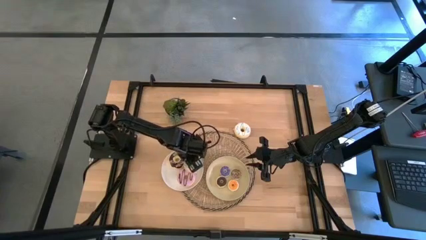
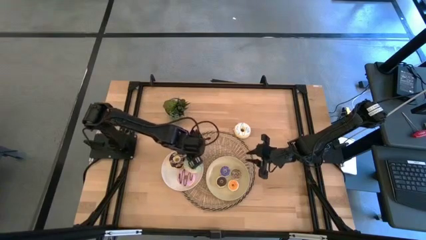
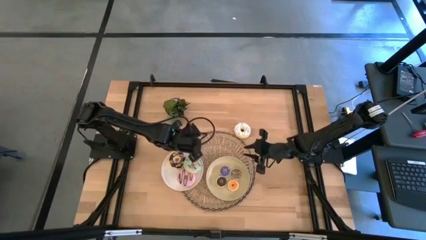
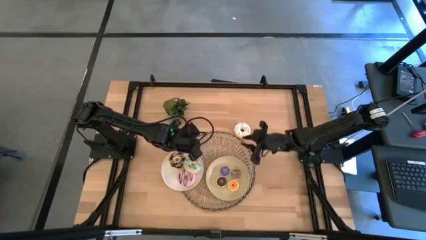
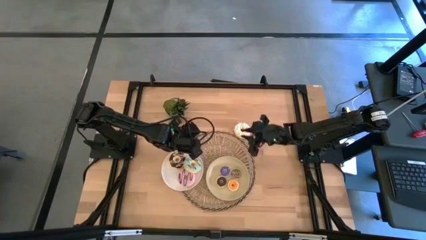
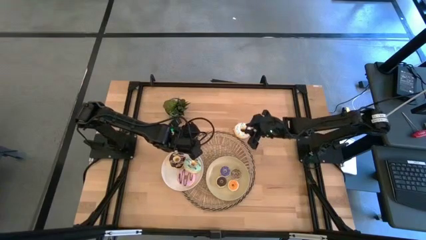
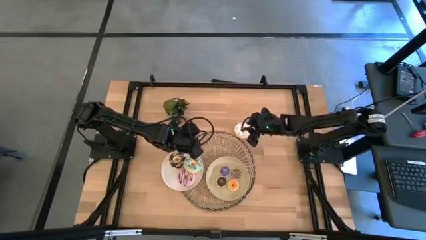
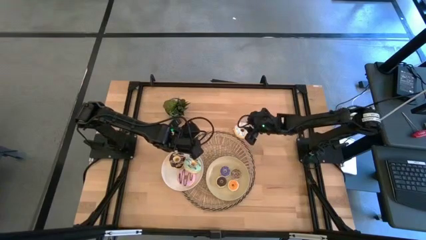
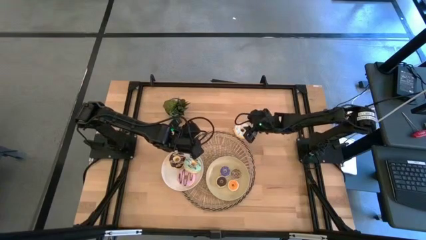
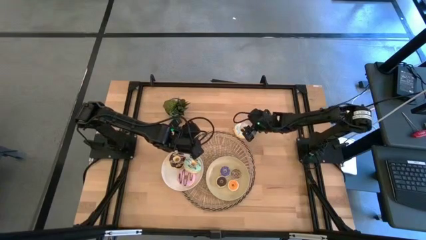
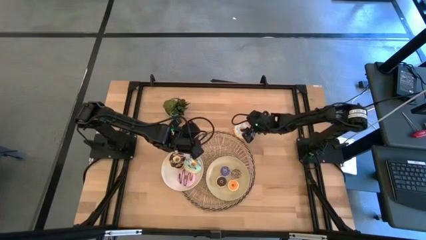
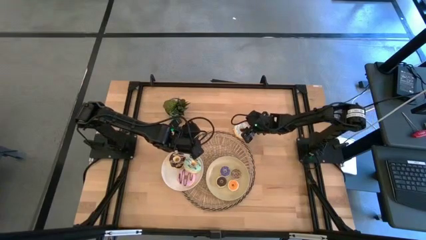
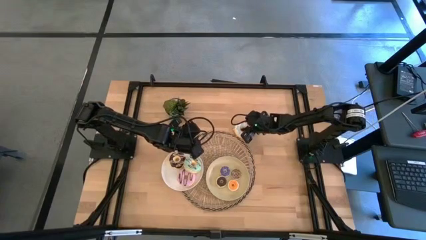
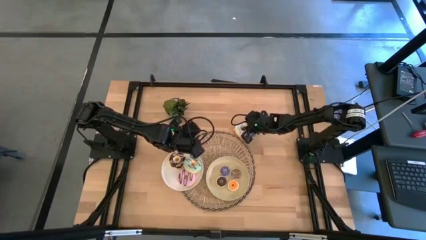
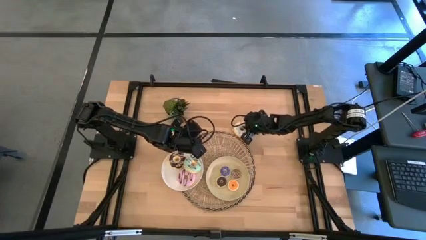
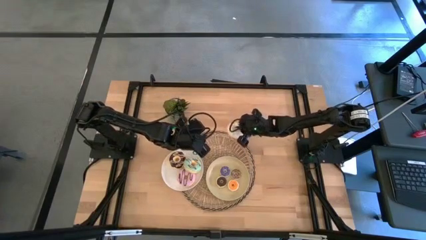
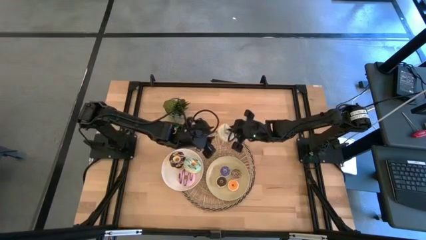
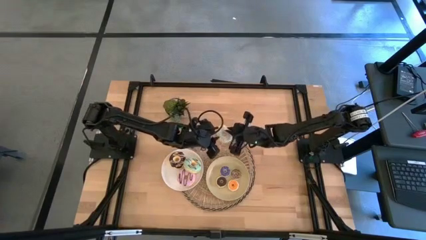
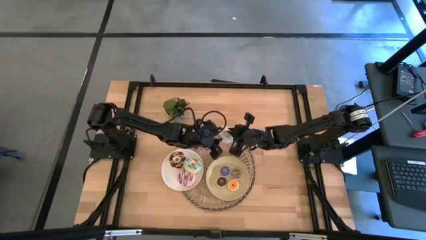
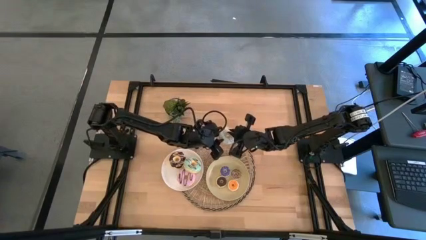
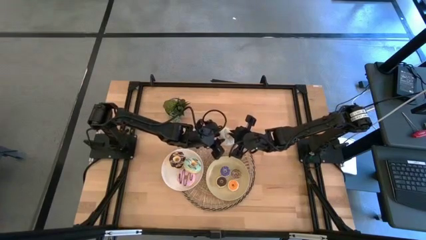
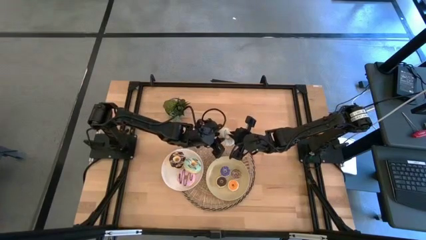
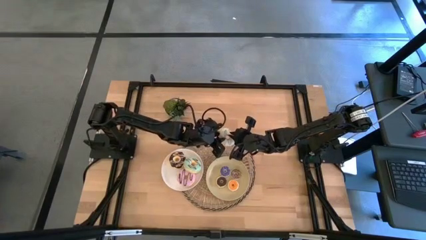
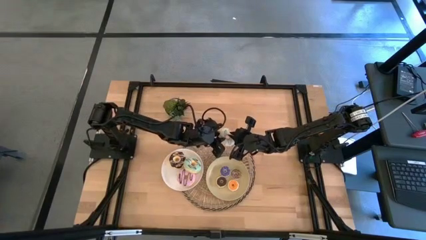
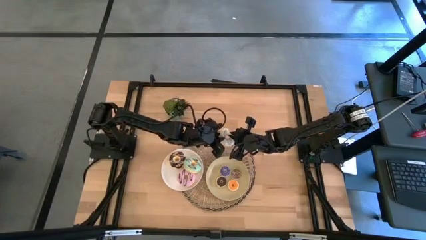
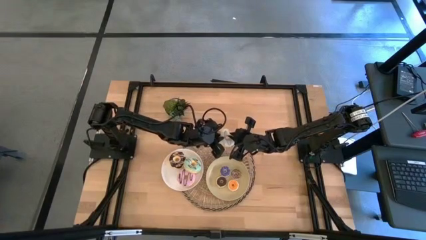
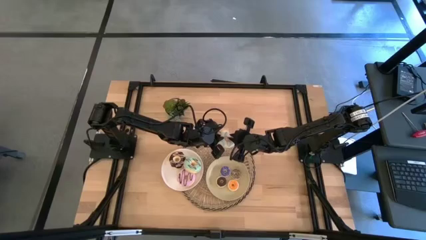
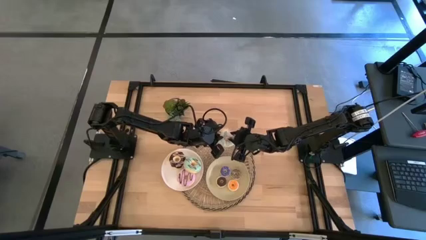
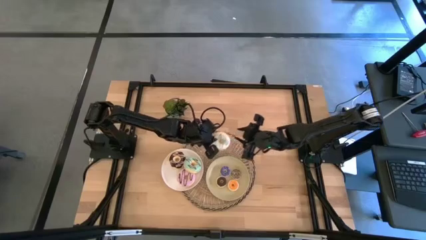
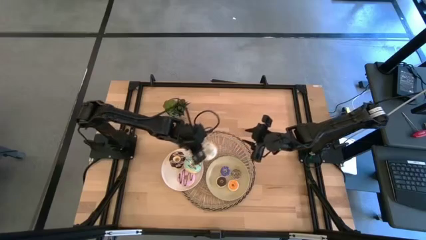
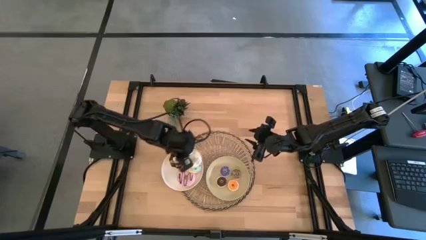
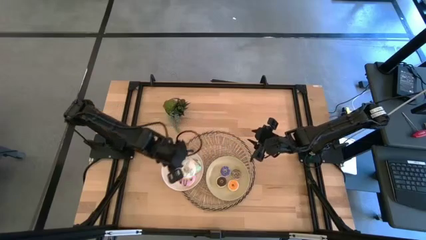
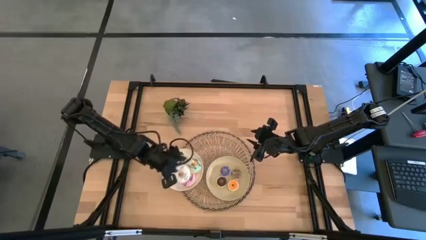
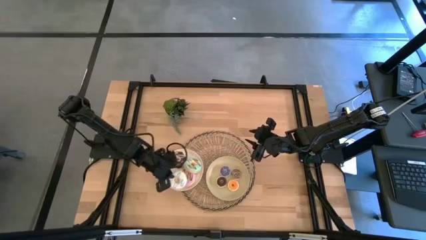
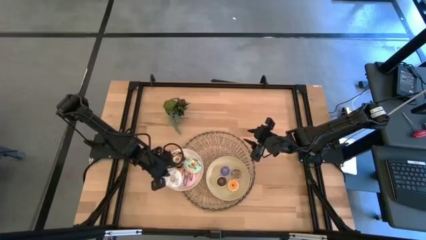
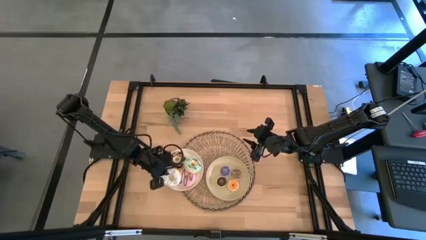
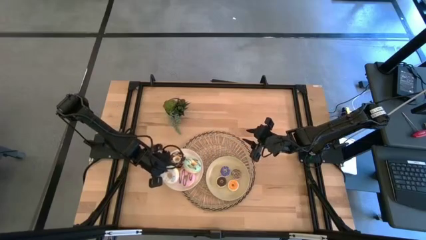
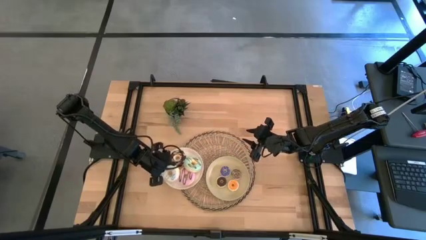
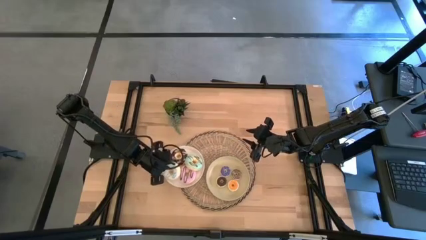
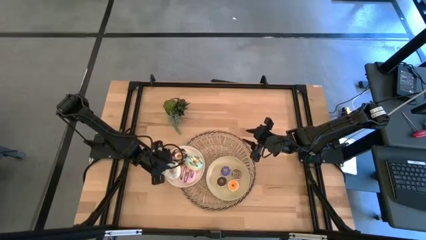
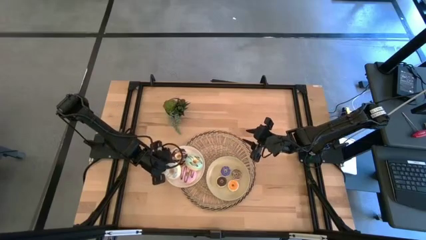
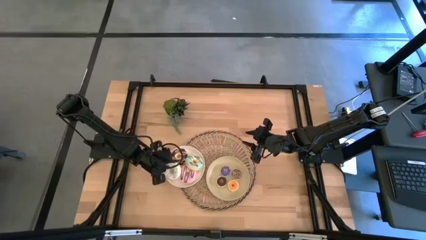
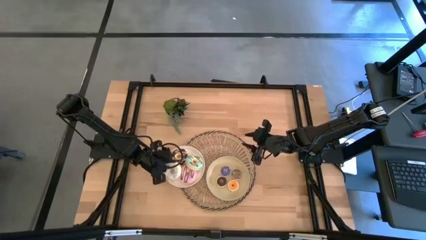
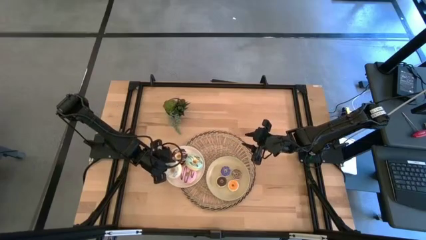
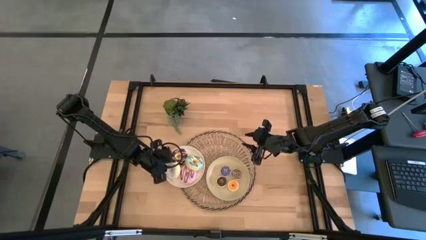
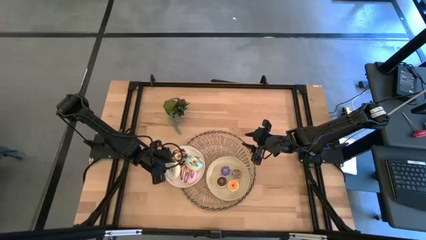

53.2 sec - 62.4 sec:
Task: Pick & Place donuts
Put the large white donut on the white plate

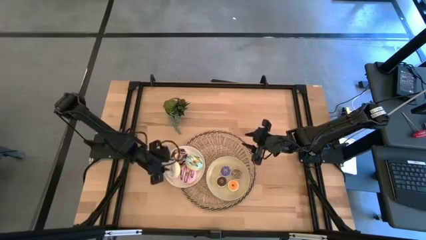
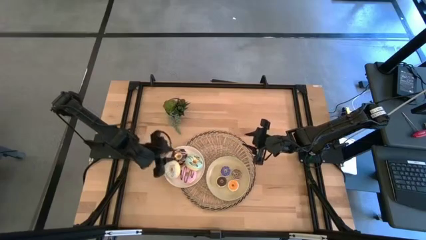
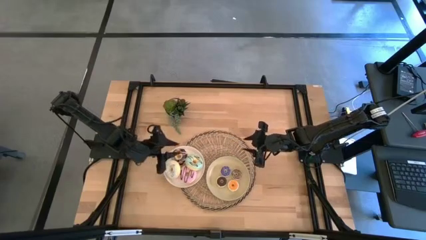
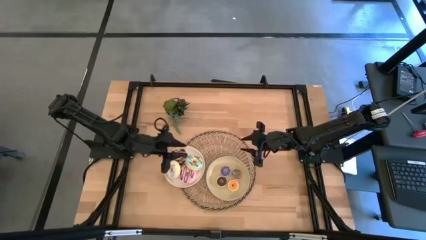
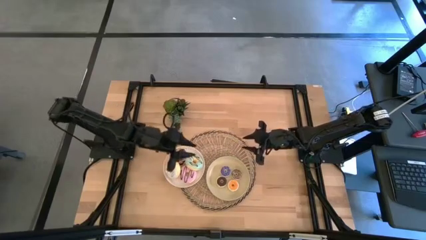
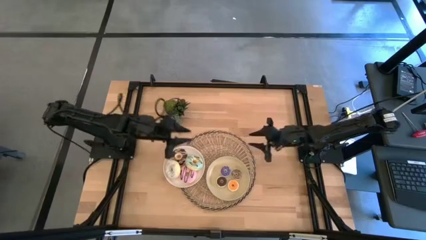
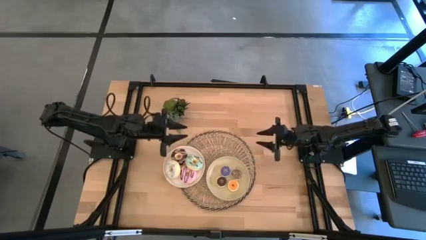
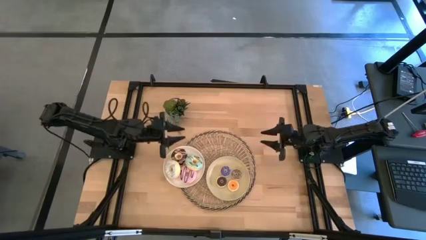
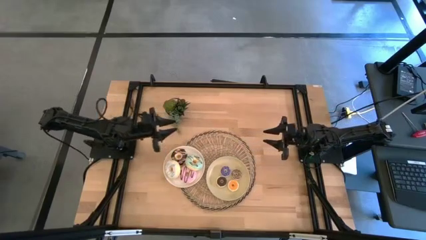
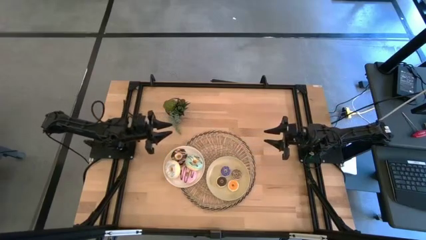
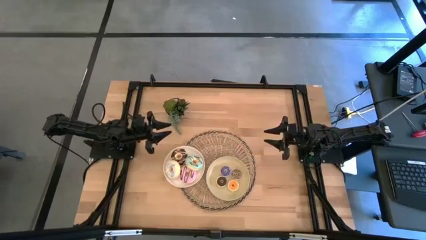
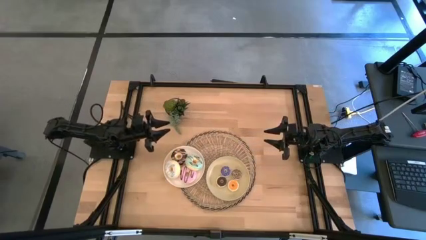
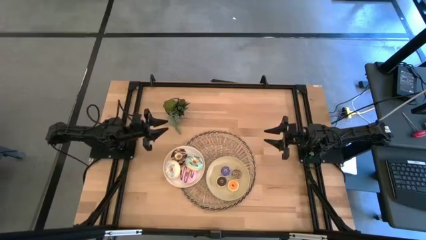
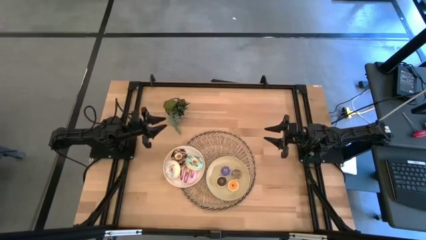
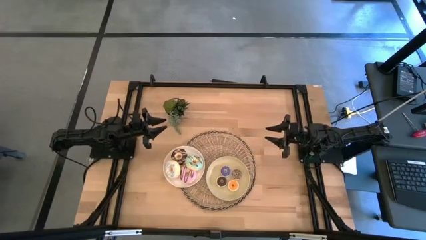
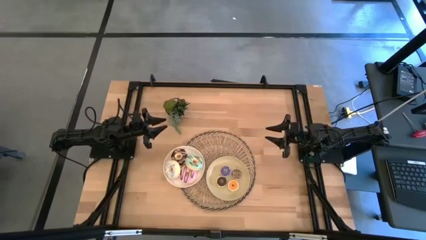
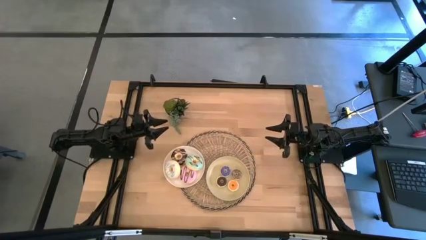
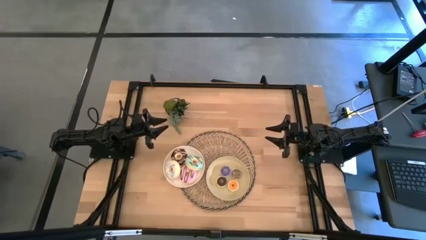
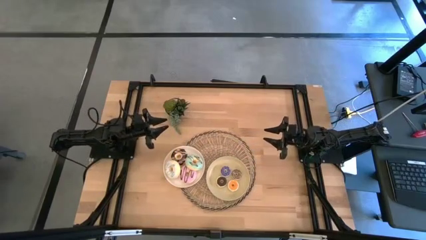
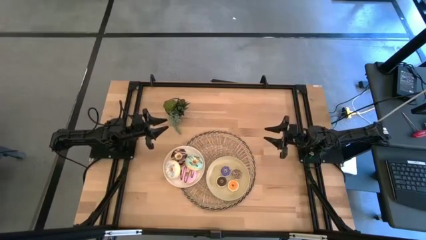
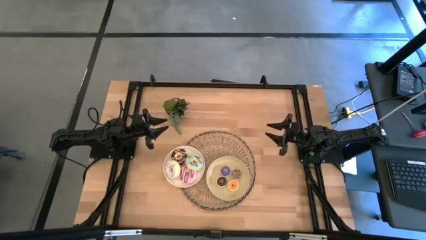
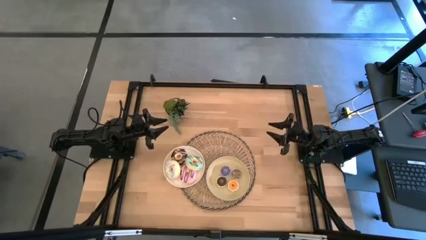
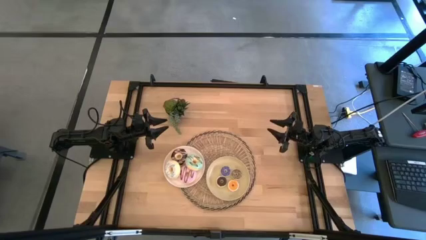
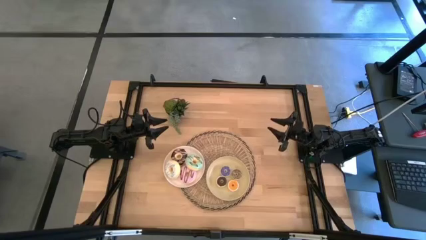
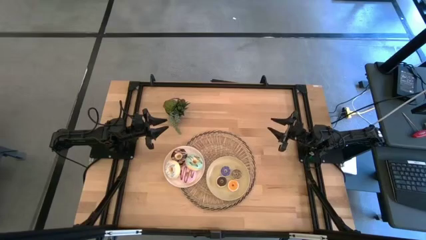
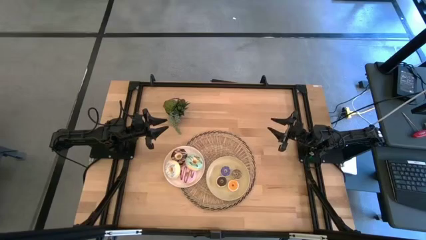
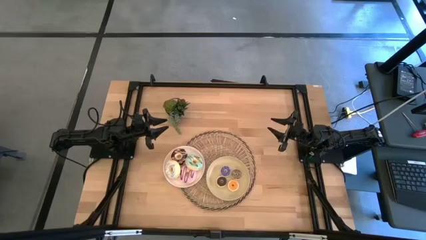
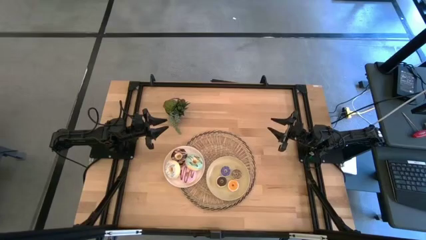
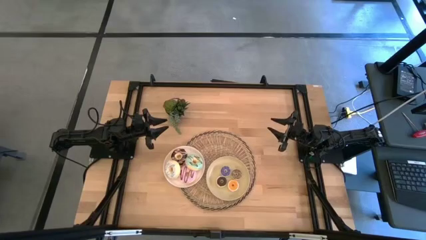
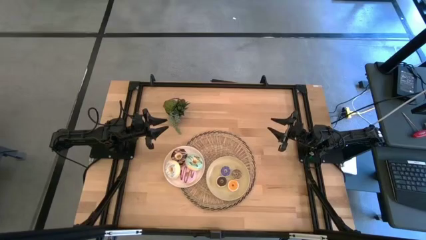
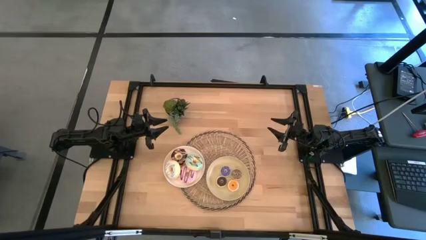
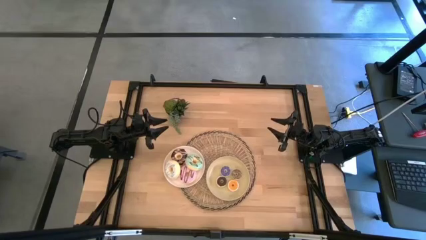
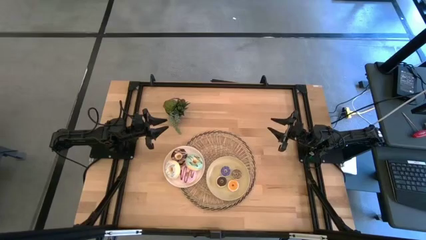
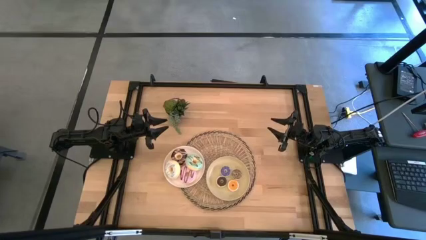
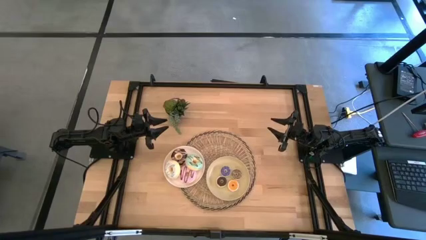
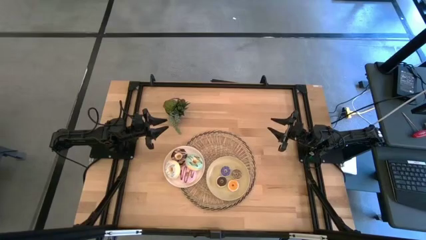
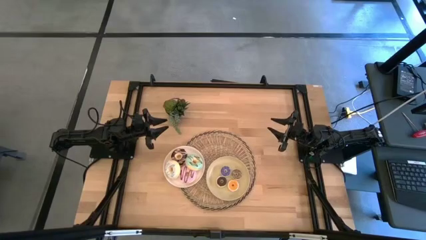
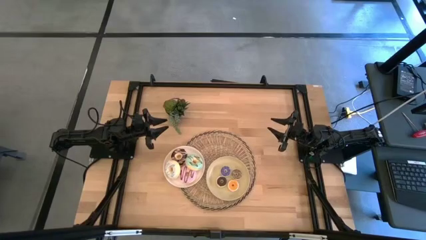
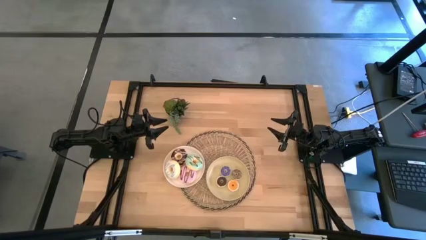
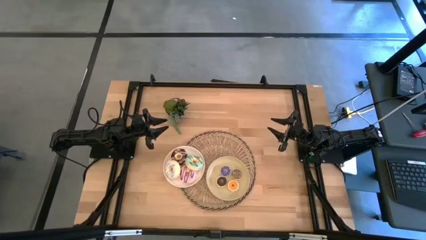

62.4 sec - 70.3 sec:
Return to Home Position
